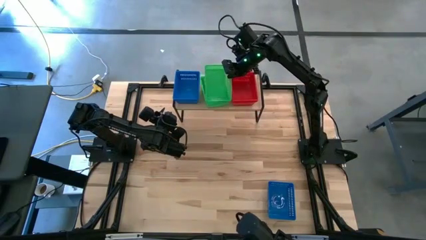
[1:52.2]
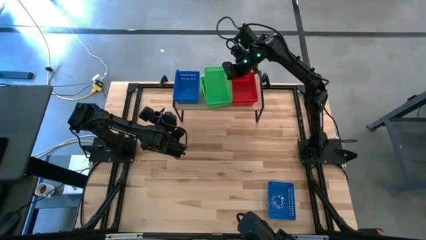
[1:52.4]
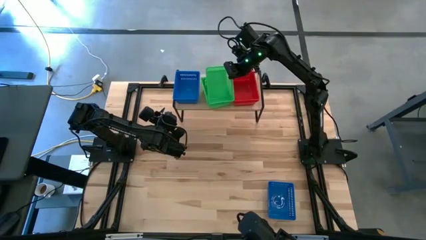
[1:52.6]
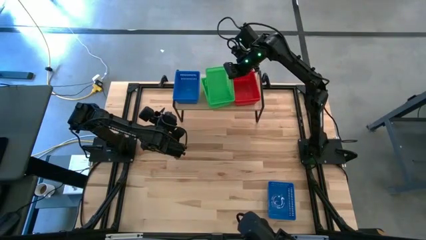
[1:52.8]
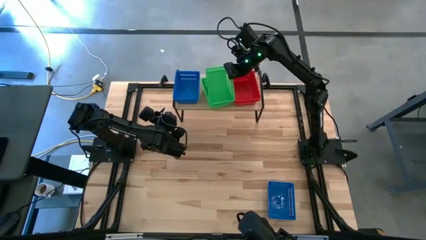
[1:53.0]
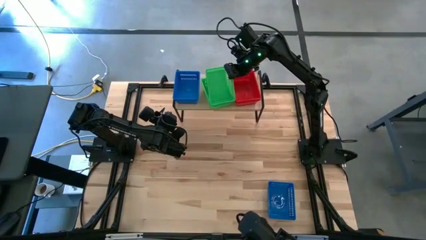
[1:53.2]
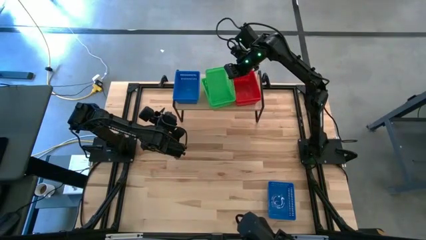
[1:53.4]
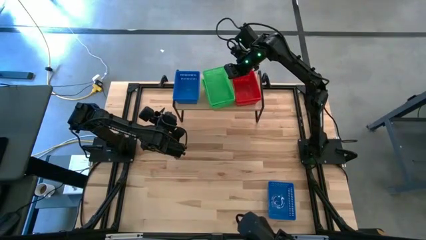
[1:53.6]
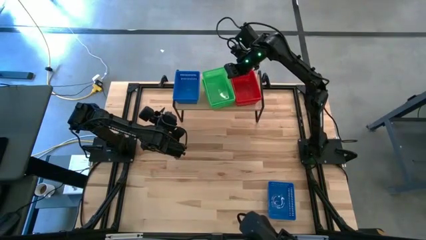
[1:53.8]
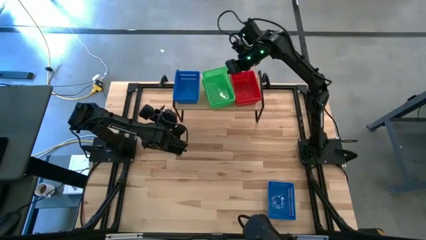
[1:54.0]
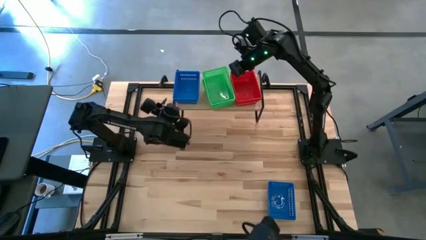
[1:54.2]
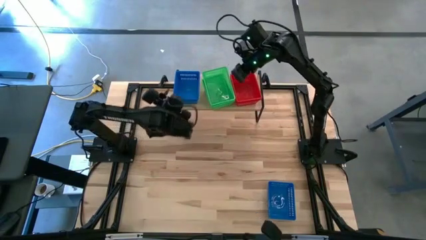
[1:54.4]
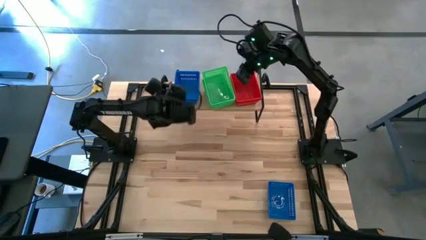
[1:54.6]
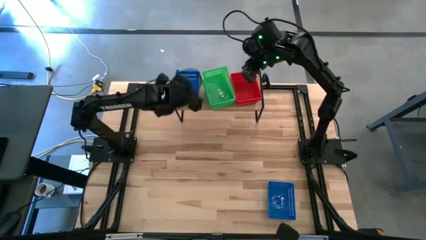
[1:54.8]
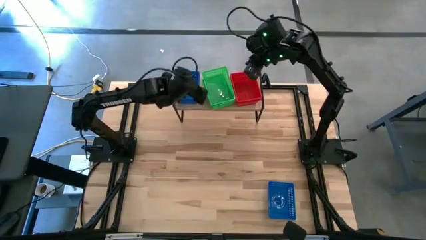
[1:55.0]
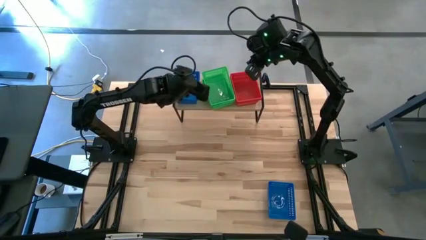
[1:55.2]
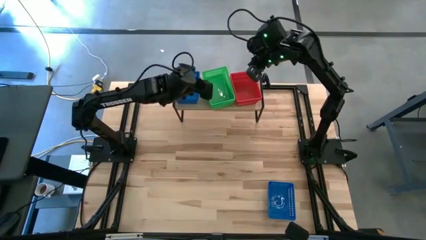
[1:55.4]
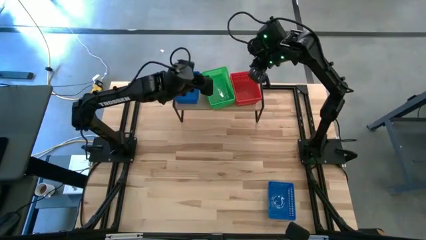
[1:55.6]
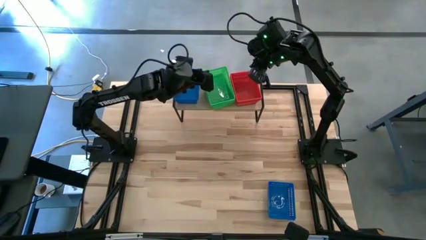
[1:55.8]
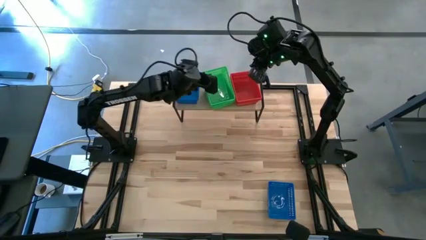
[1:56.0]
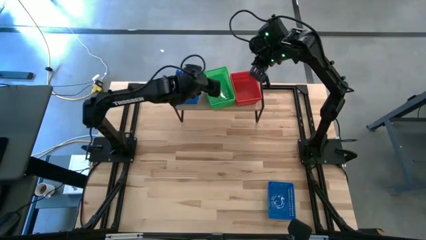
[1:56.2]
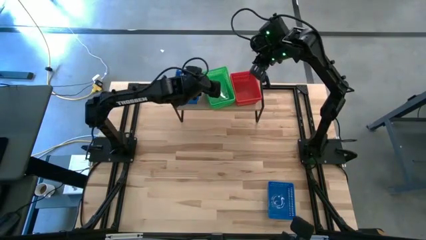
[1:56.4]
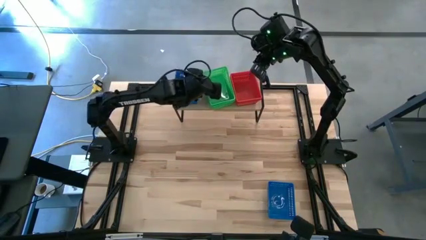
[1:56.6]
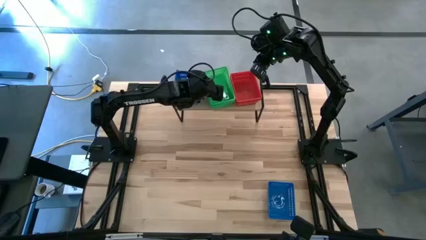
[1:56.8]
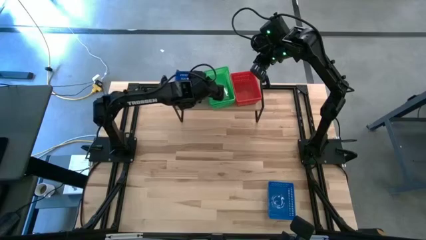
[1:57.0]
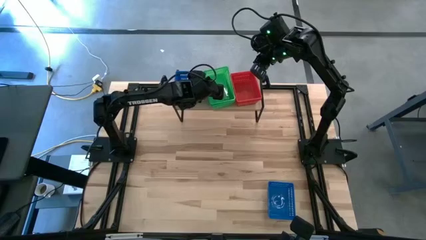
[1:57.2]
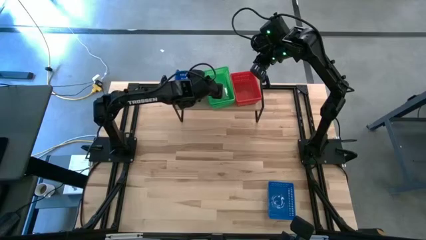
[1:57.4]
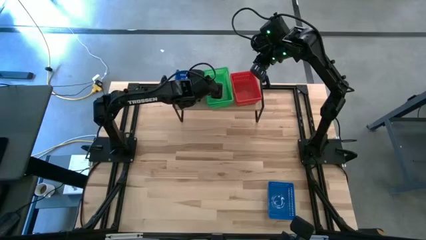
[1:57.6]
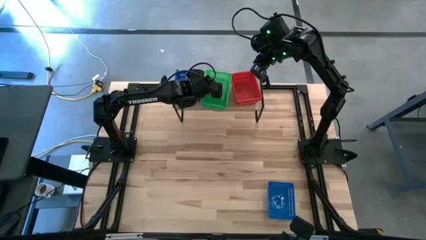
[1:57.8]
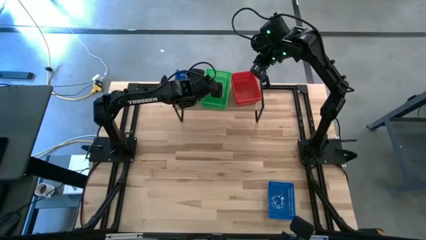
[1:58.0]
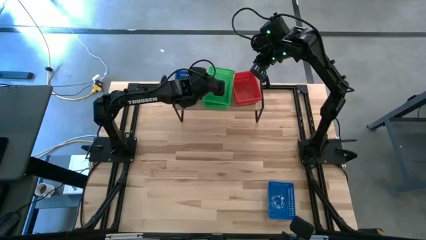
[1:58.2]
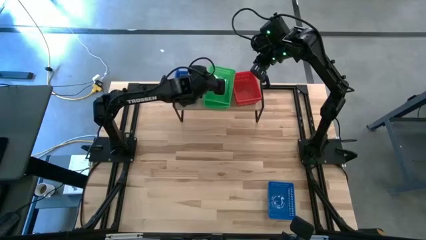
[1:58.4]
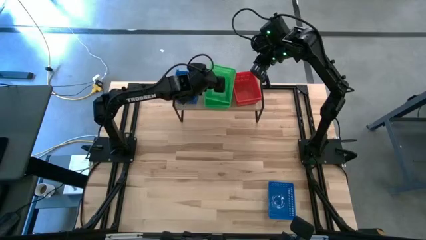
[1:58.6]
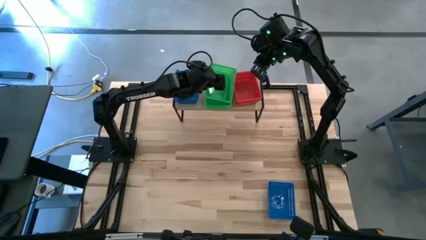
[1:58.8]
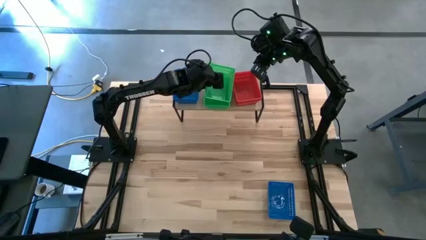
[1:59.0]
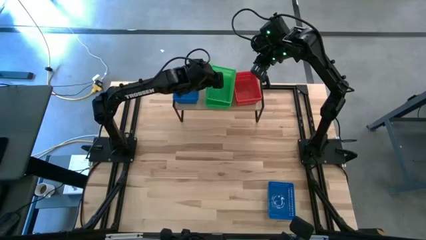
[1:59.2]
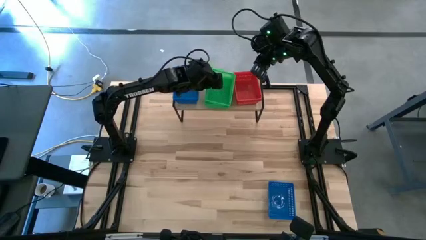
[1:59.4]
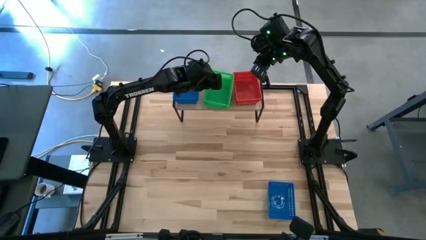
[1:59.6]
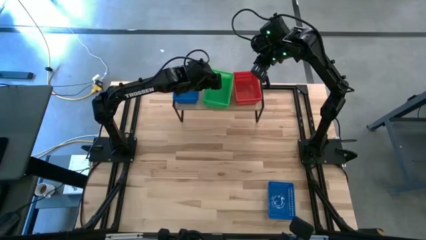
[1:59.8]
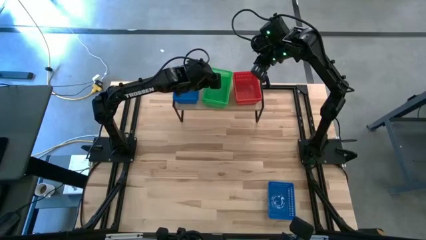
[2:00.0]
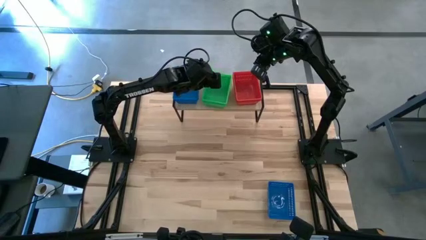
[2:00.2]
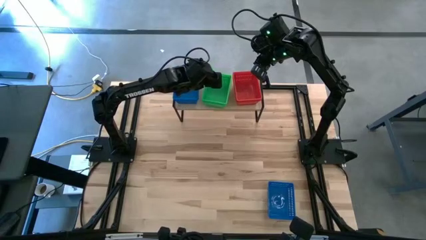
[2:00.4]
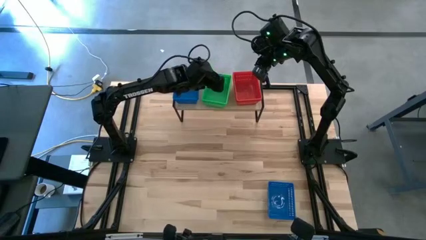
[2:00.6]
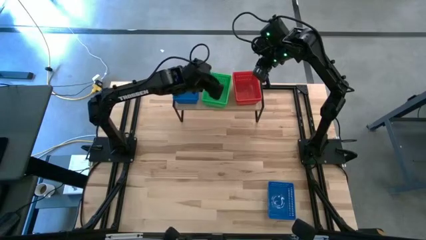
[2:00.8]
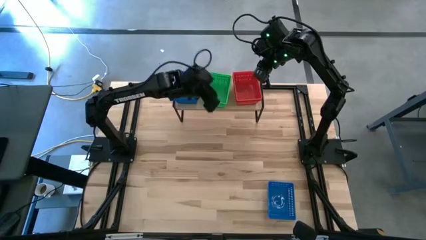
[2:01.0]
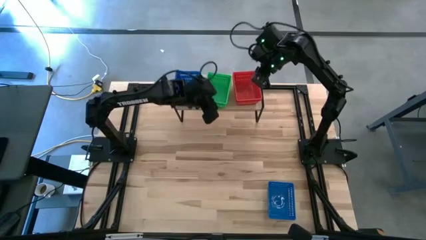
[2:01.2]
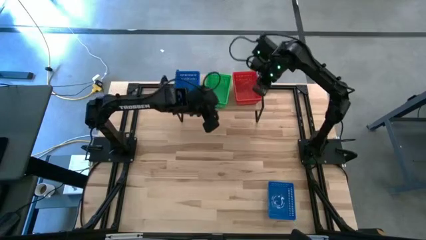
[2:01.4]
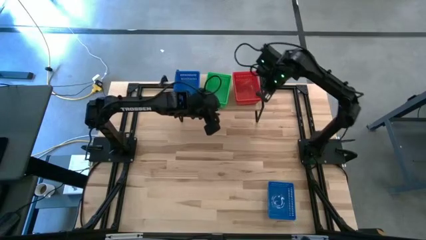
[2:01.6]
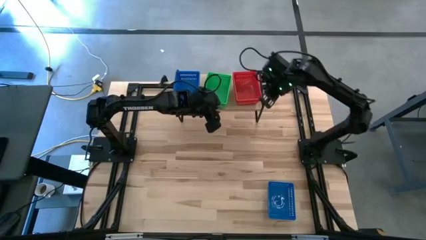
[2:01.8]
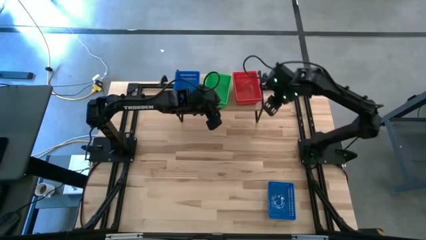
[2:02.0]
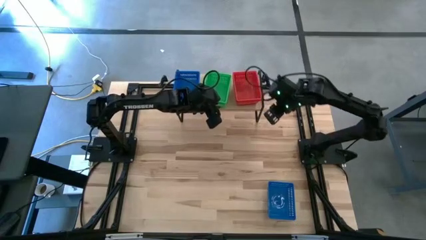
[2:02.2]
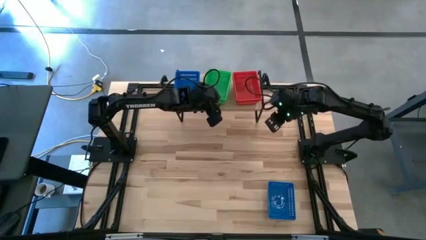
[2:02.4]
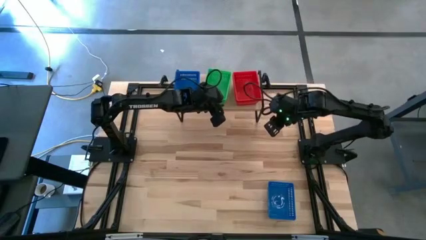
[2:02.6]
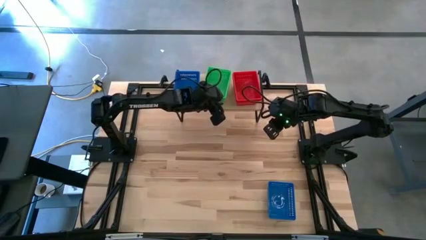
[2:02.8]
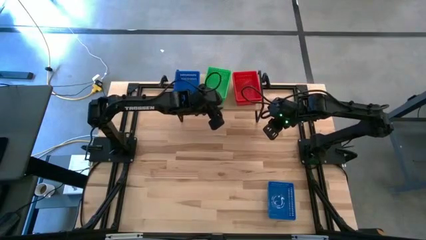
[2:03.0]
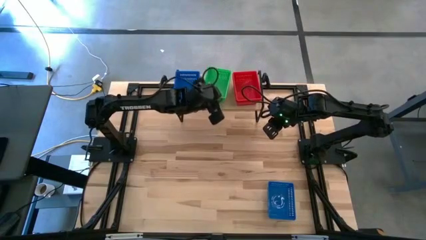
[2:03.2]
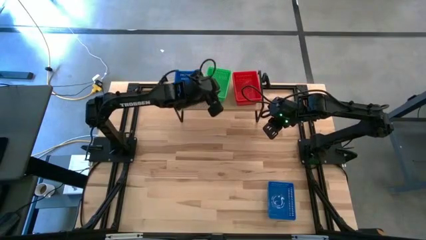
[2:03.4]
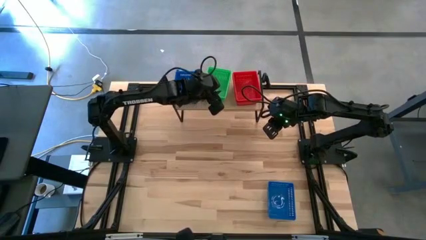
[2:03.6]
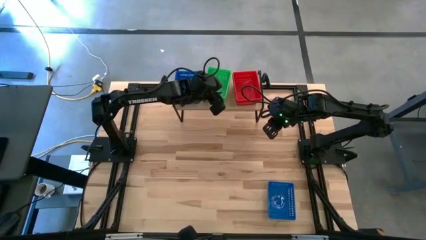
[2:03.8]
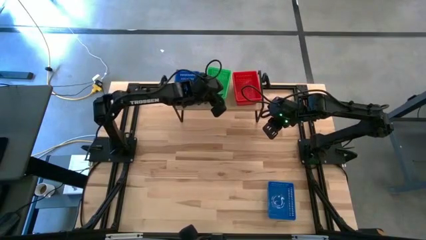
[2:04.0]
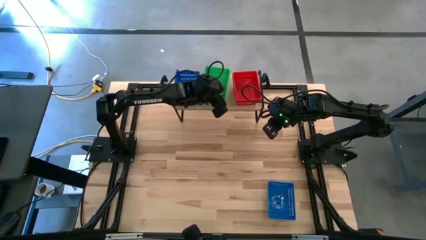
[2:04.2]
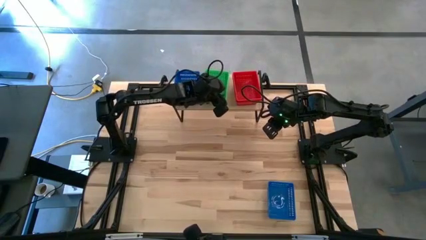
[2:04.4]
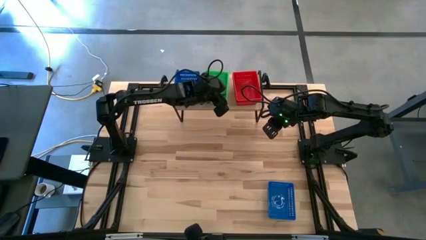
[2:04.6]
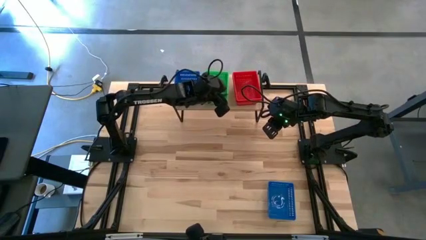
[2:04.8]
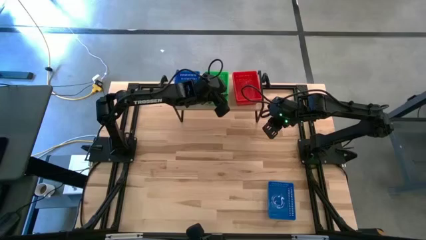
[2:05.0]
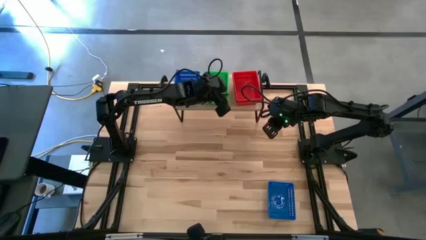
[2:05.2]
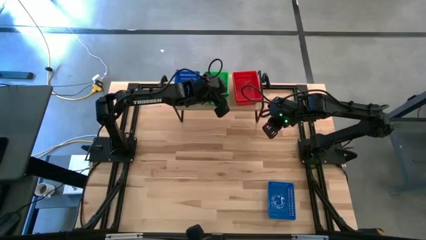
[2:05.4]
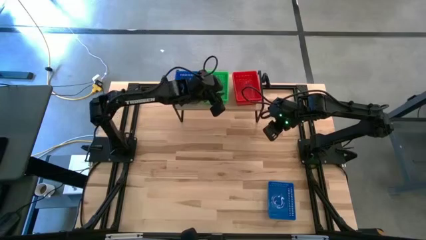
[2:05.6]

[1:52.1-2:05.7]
Task: Stack baskets on shelf by color
Stack the green bin on top of the green bin on the shelf

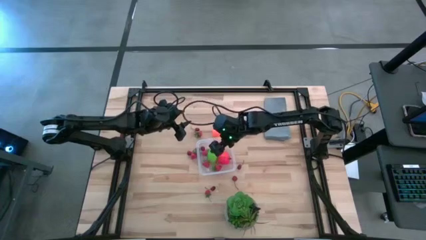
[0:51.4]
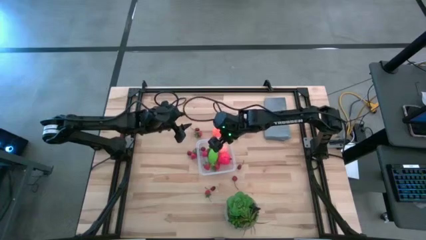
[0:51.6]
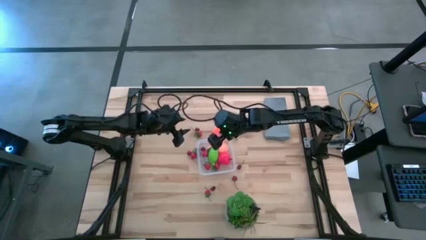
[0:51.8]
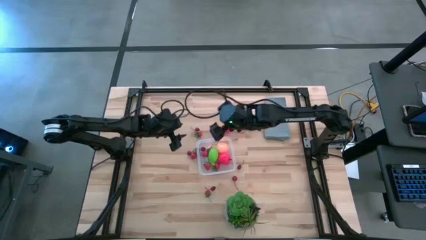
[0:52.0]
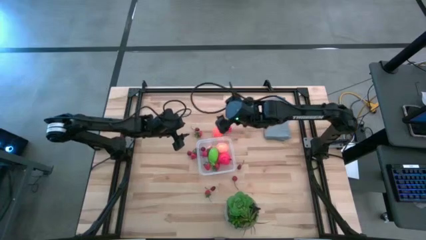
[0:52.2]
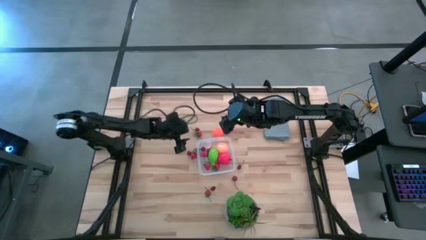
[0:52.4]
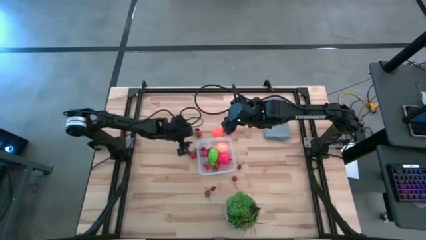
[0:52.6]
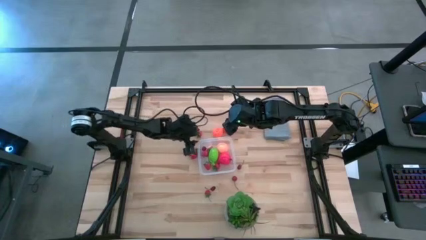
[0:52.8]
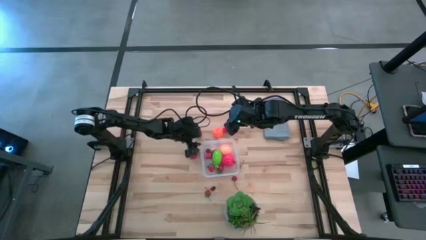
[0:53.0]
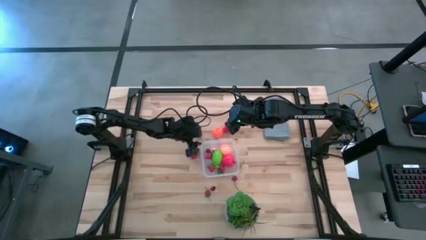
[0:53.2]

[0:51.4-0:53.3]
Task: Pick and placing Produce into tupperware
Adjust the transparent container
